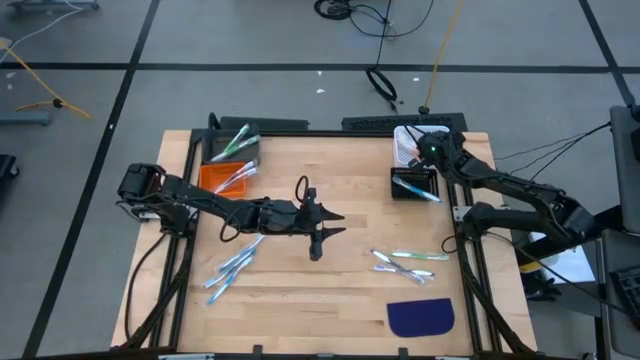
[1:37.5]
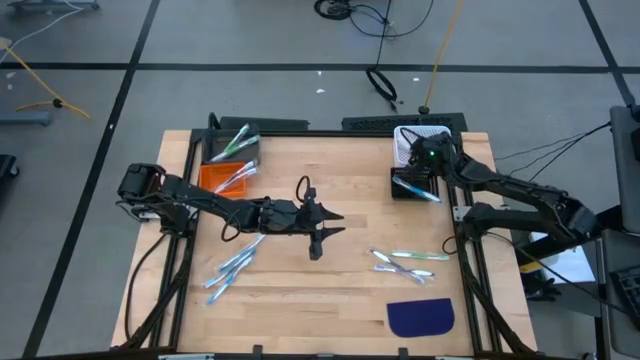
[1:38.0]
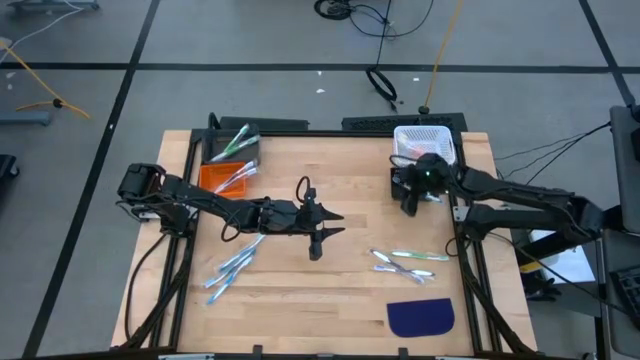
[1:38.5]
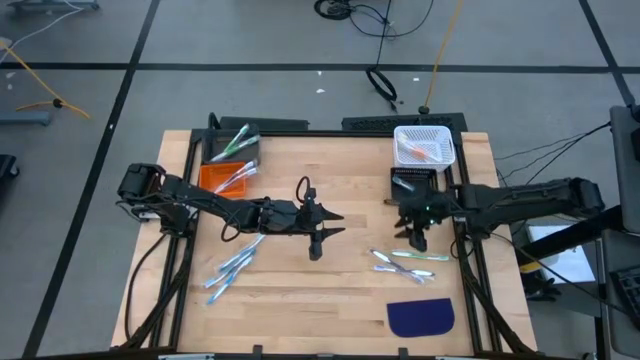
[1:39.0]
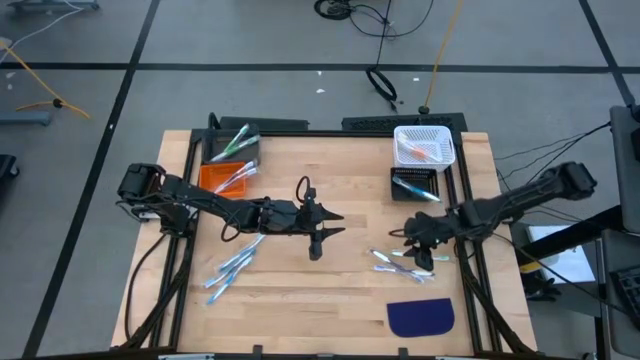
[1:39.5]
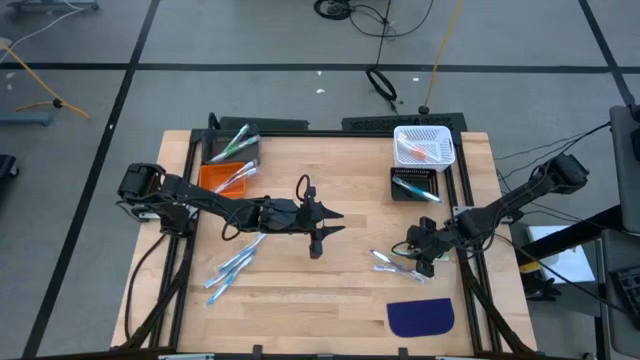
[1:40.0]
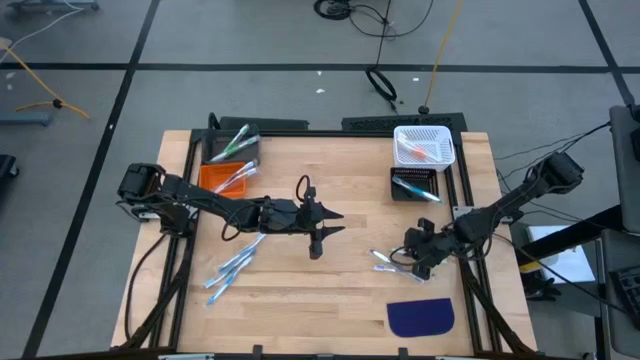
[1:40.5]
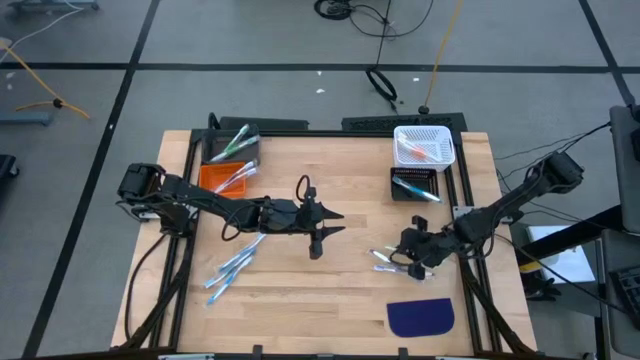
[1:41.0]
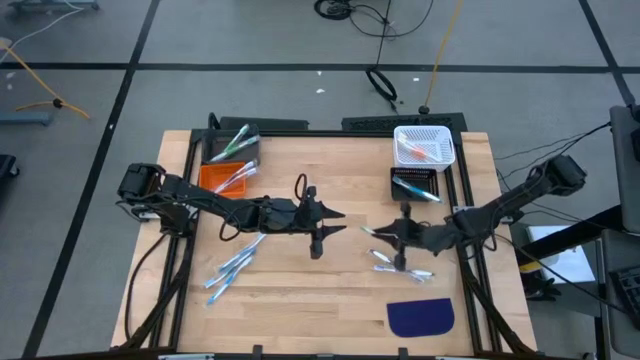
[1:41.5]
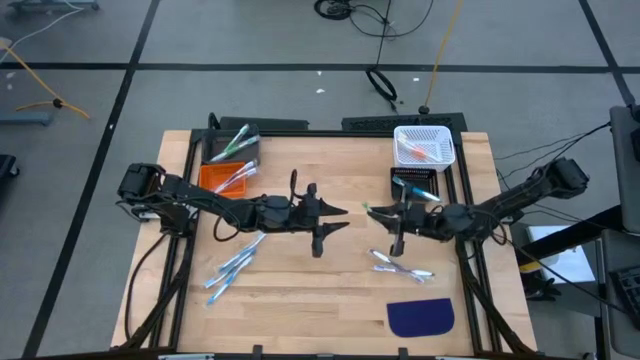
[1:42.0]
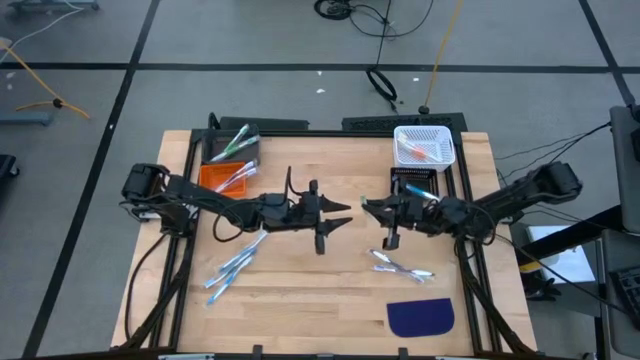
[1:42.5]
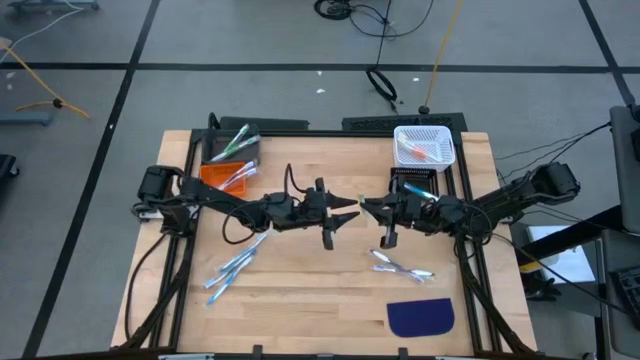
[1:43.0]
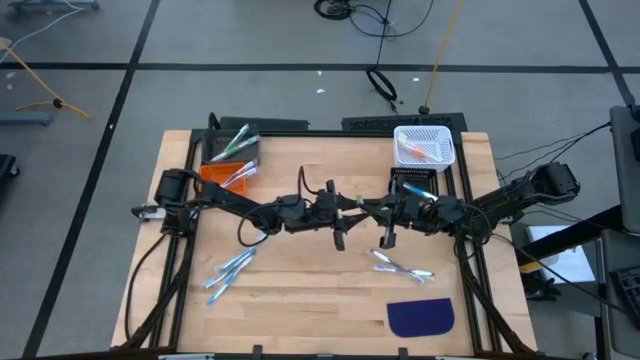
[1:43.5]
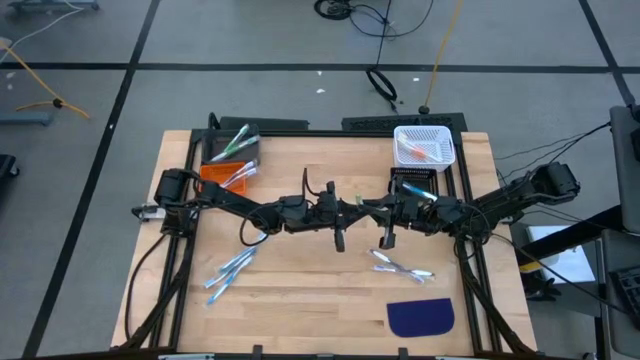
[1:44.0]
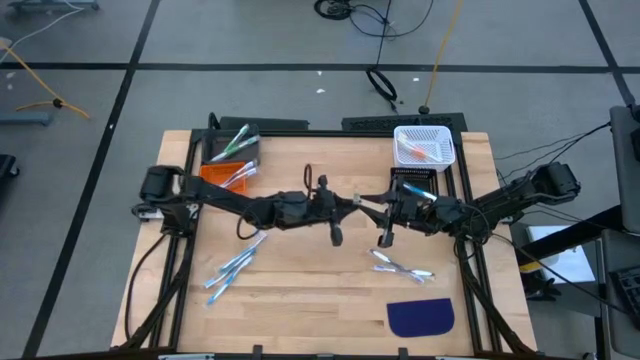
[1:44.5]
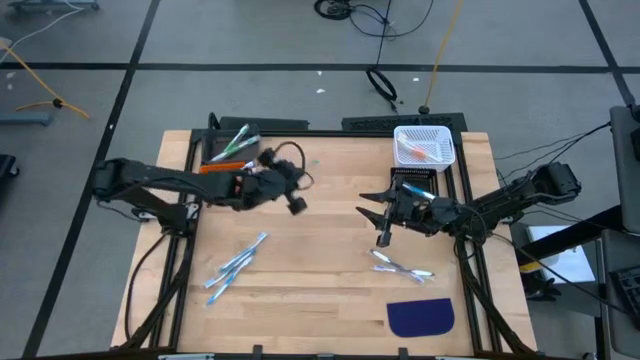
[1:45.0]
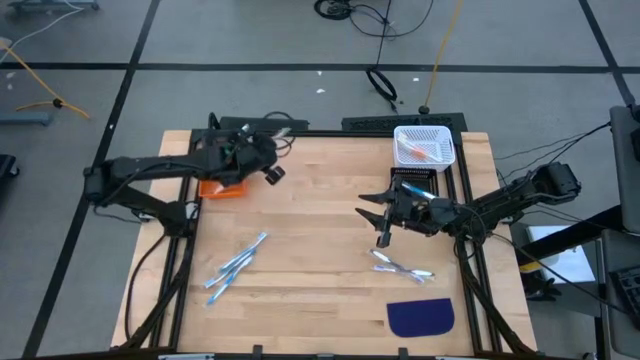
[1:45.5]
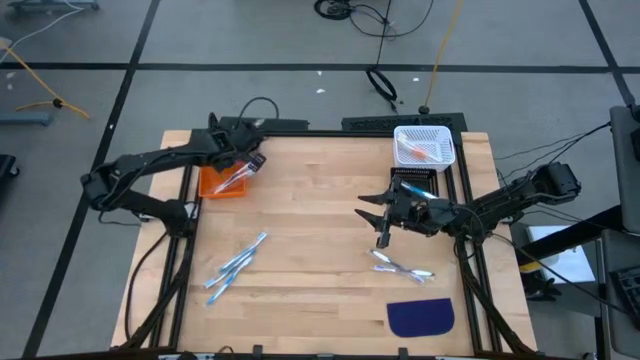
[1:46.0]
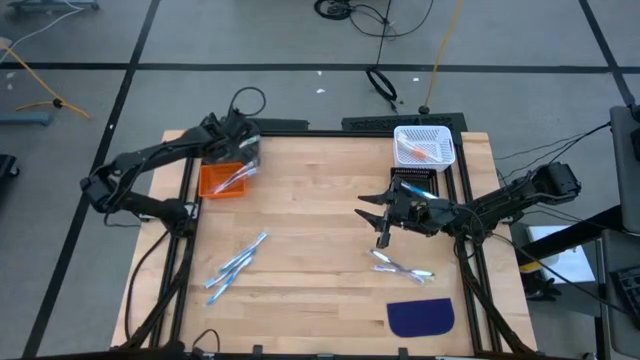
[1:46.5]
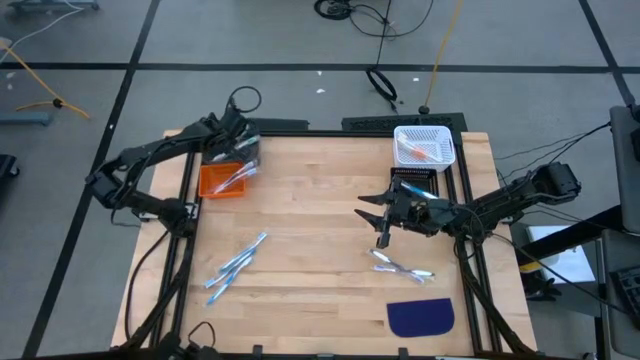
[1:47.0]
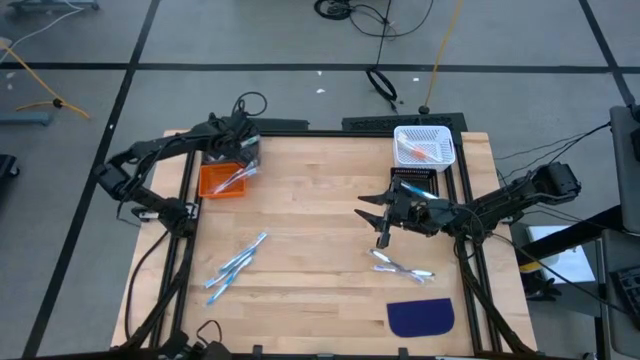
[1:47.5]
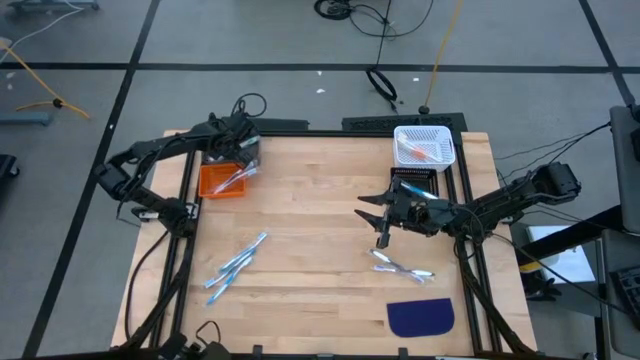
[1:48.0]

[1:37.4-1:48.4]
Task: Pick & Place Toothbrushes
Put the green toothbrush into the gray bin

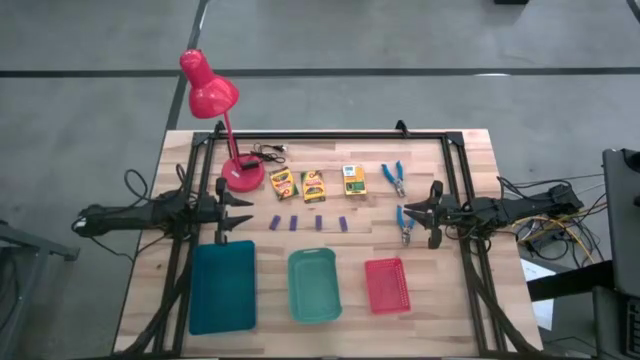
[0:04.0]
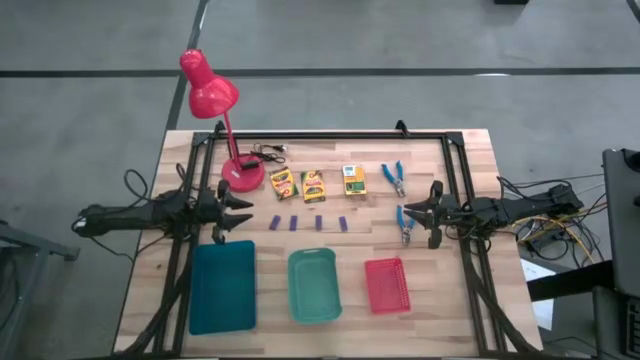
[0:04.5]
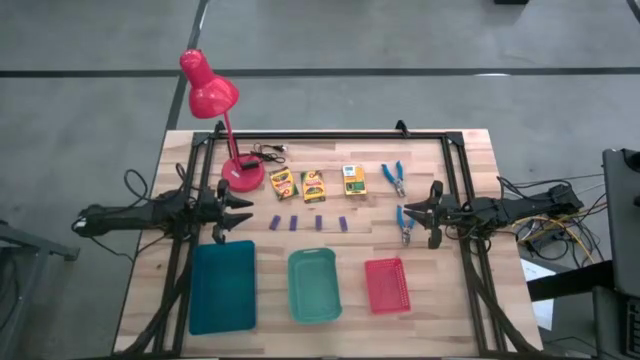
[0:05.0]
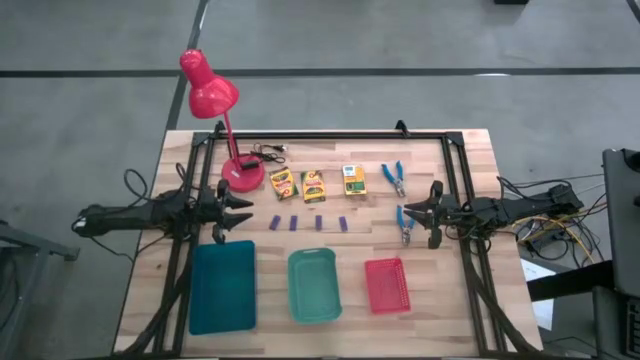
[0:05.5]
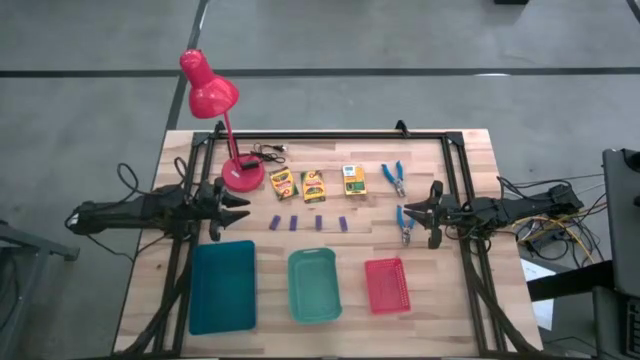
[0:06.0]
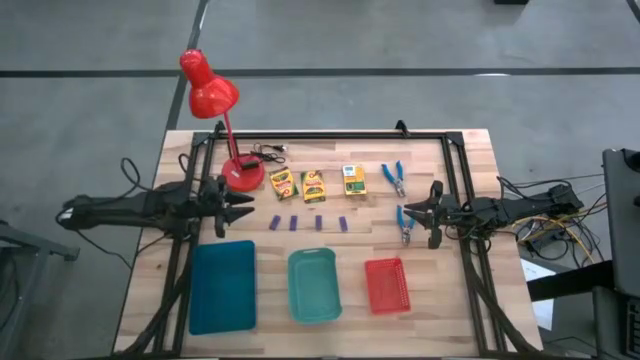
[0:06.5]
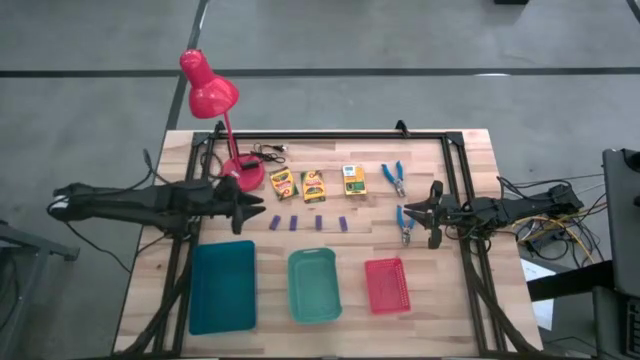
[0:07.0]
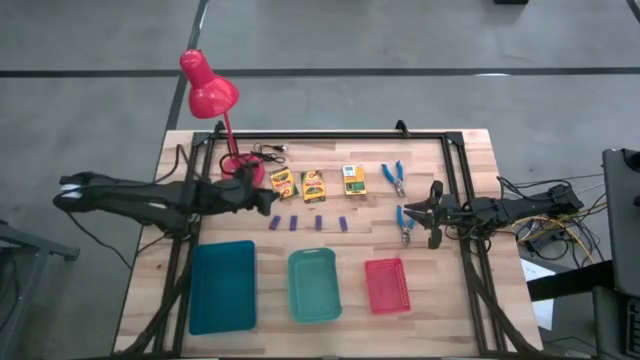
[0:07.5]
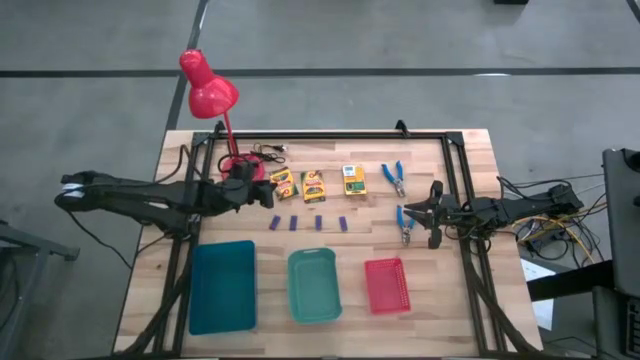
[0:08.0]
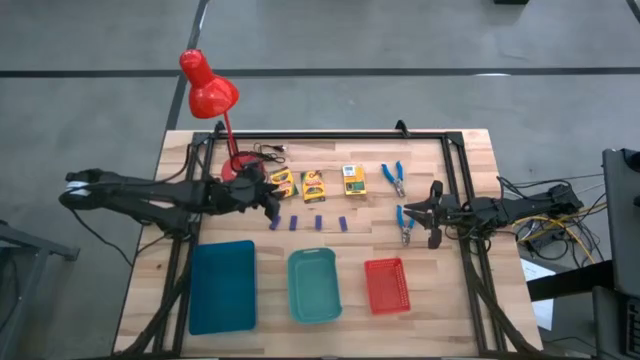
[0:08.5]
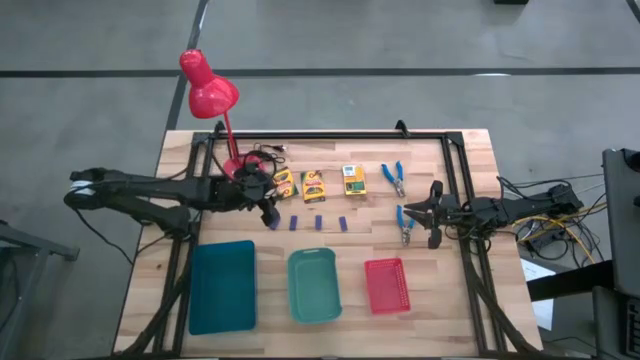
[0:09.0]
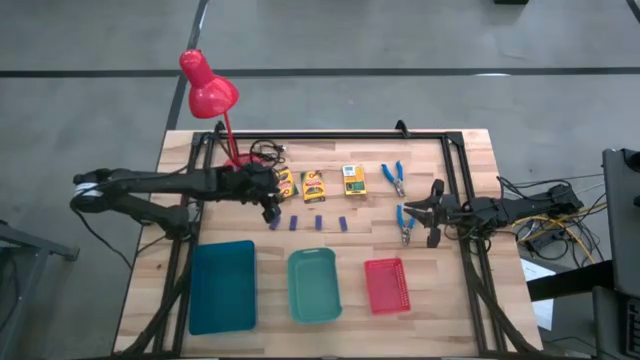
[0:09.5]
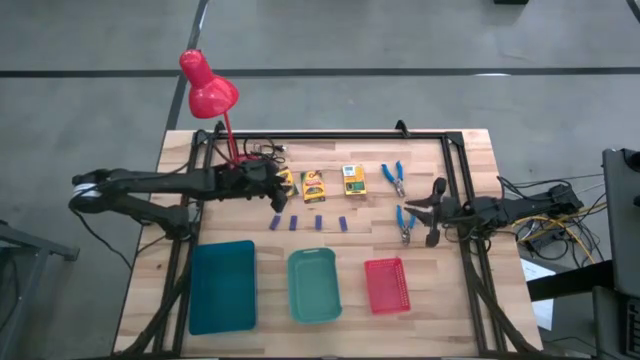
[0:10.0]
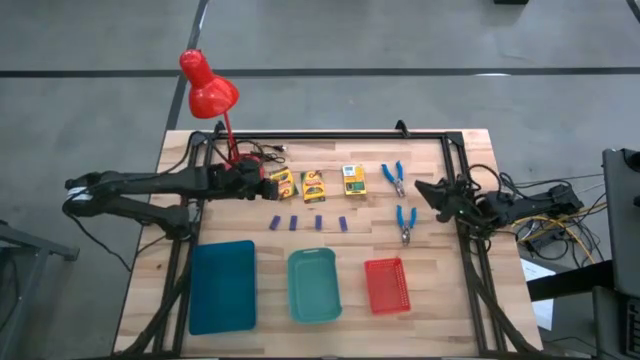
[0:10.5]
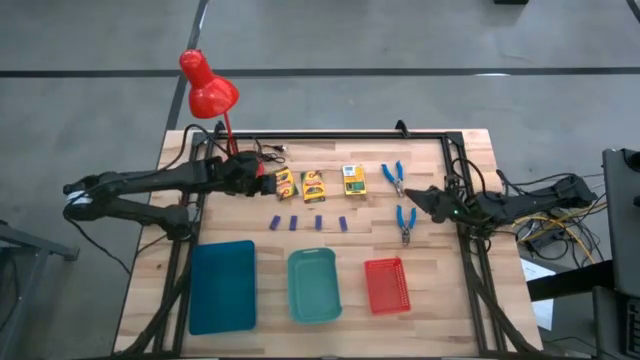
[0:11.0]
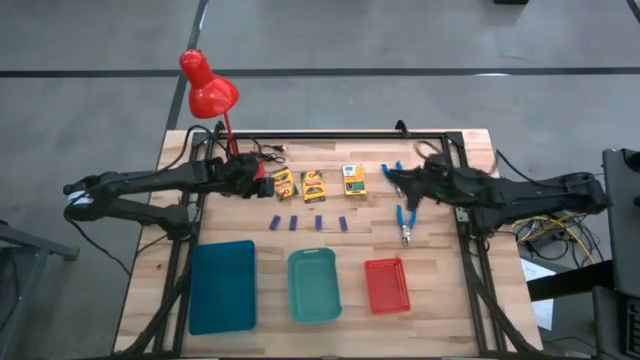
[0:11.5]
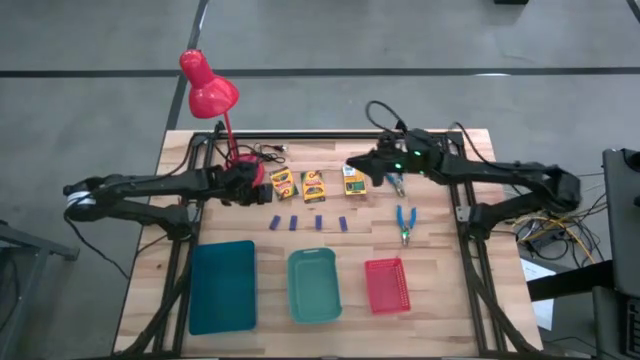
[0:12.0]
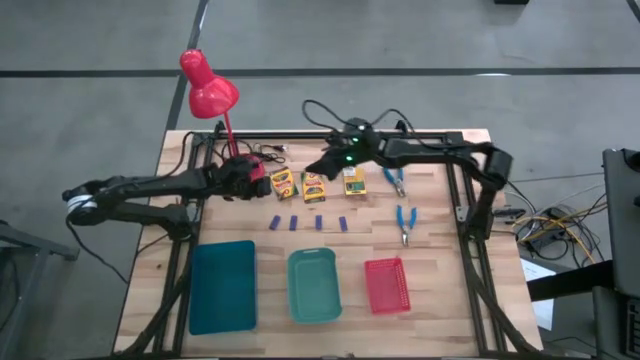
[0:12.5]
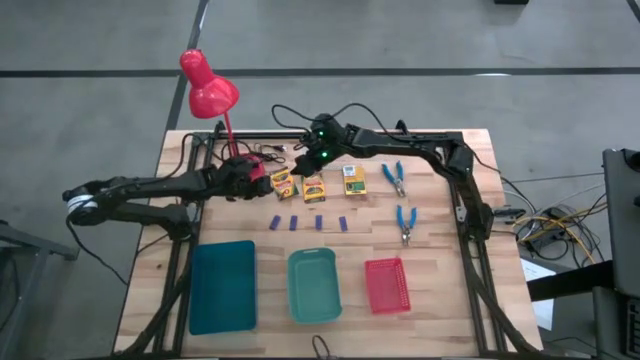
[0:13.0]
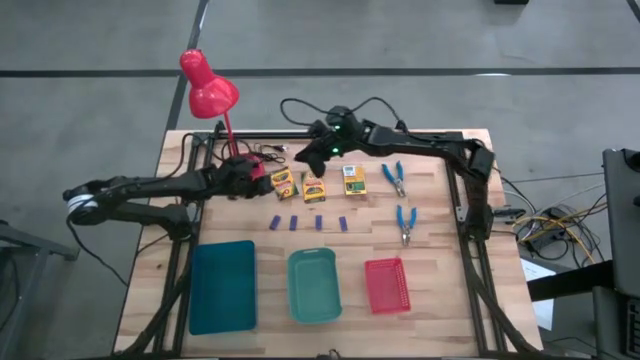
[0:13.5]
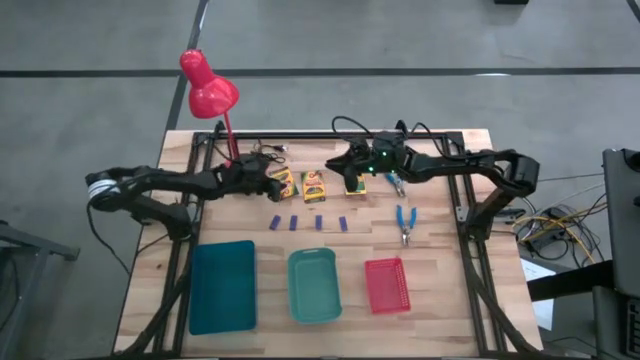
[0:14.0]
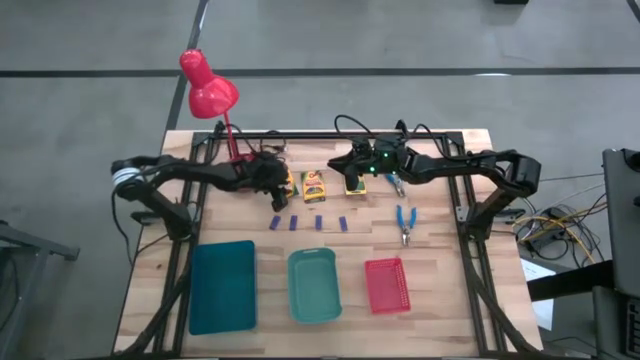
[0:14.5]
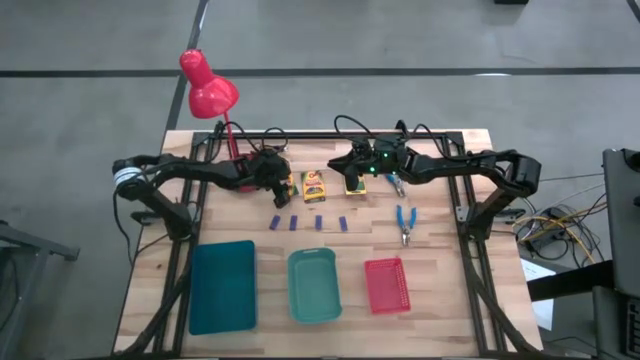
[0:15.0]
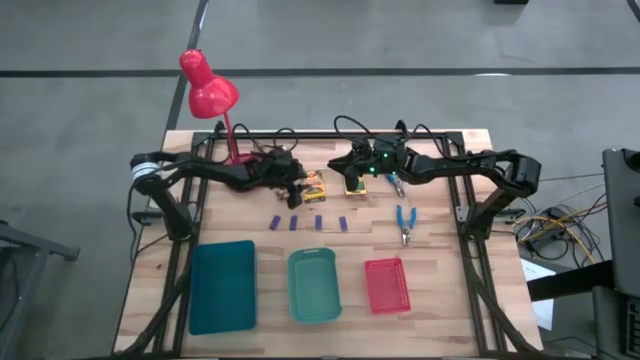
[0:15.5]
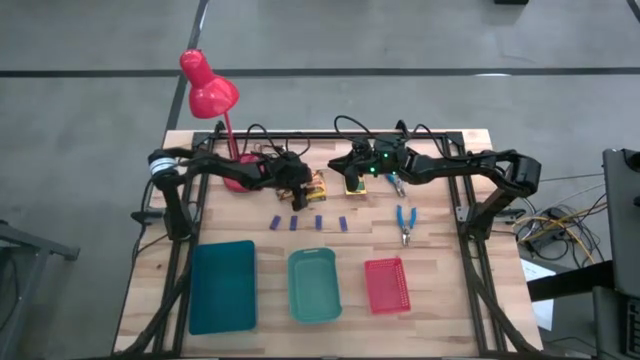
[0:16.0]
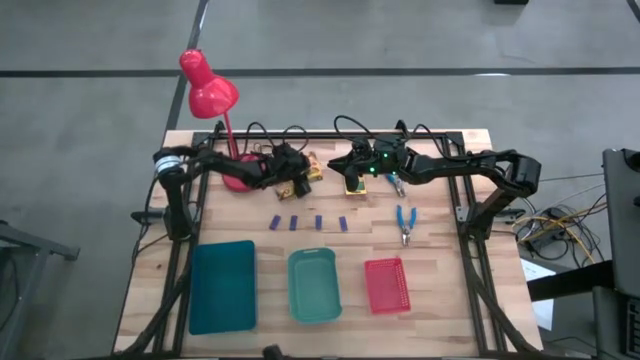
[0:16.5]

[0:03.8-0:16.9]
Task: Pick & Place School Supplies
Adjust the middle crayon box
